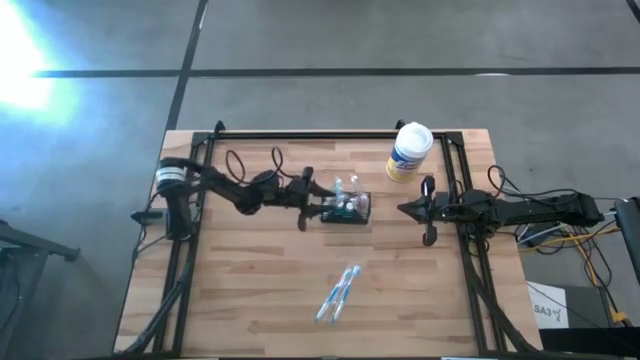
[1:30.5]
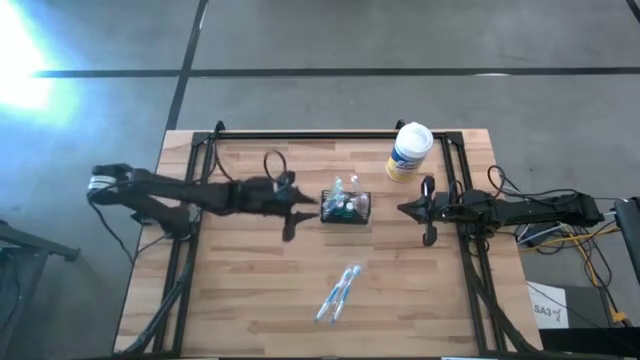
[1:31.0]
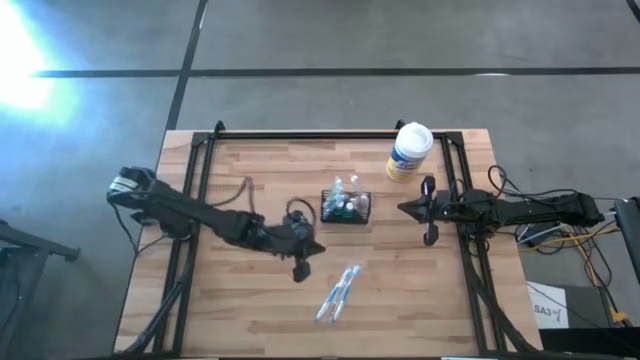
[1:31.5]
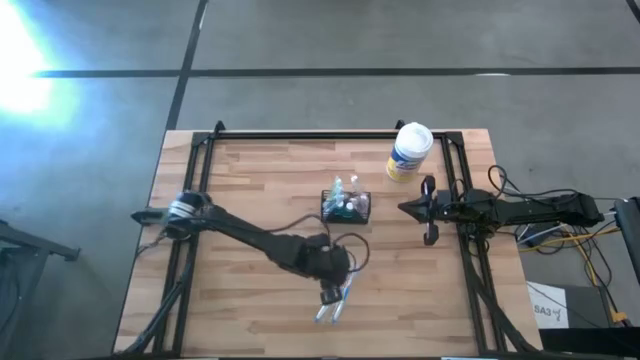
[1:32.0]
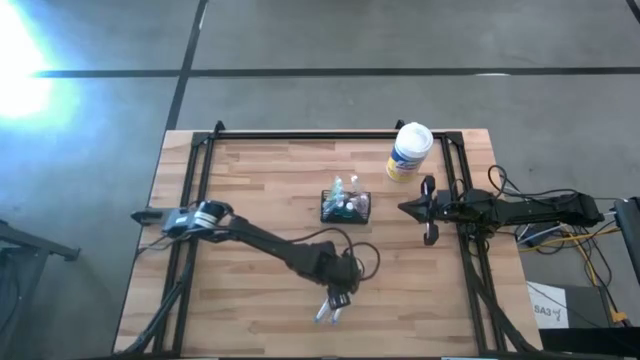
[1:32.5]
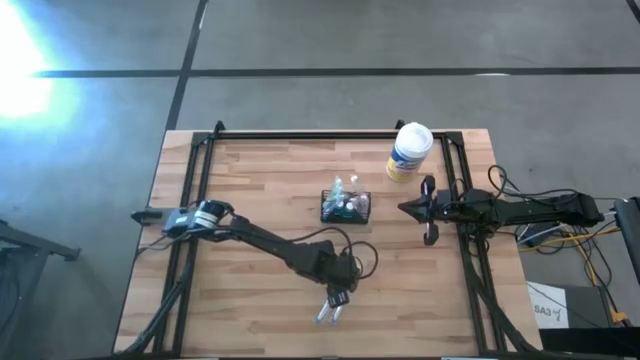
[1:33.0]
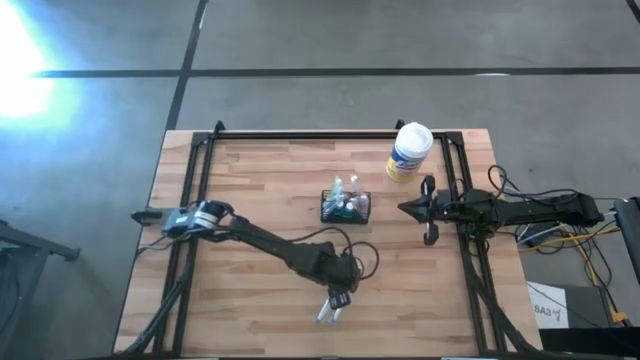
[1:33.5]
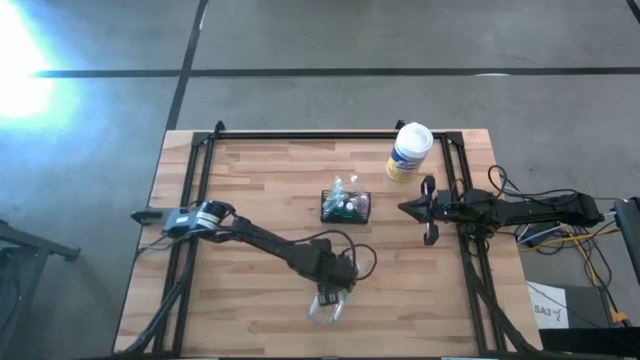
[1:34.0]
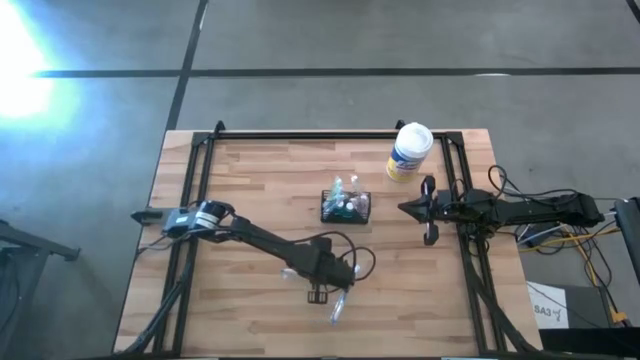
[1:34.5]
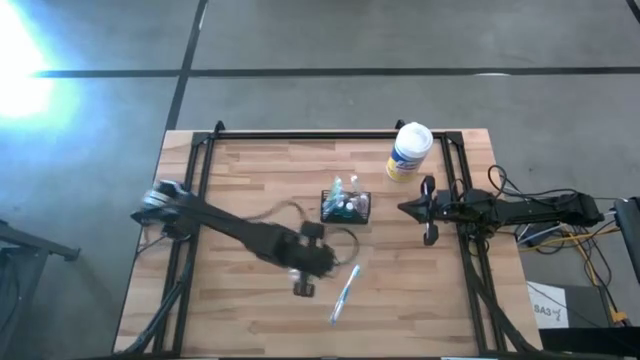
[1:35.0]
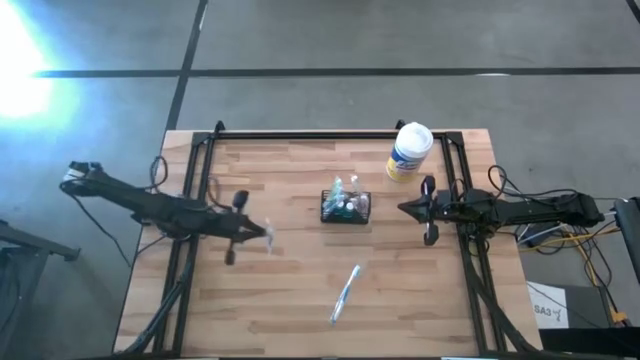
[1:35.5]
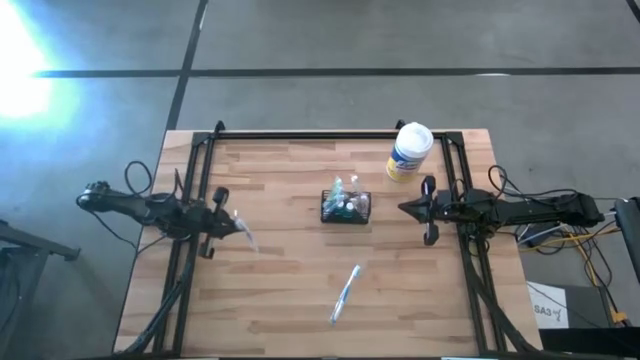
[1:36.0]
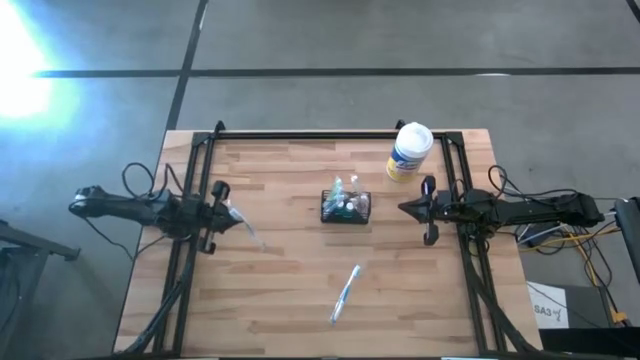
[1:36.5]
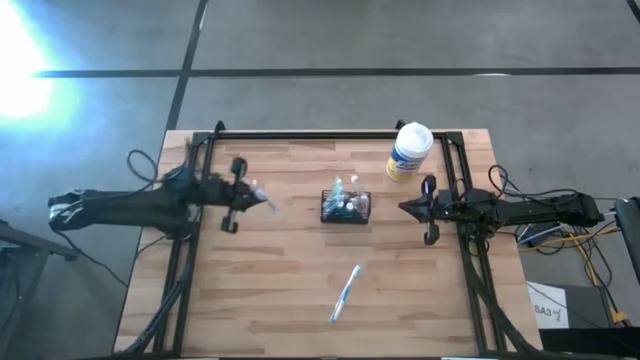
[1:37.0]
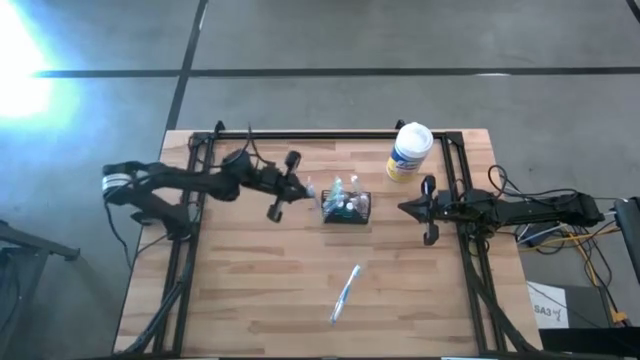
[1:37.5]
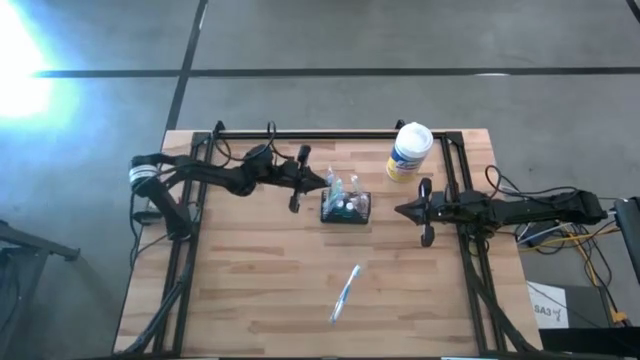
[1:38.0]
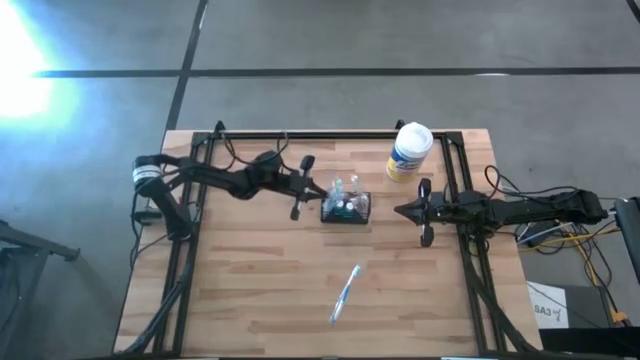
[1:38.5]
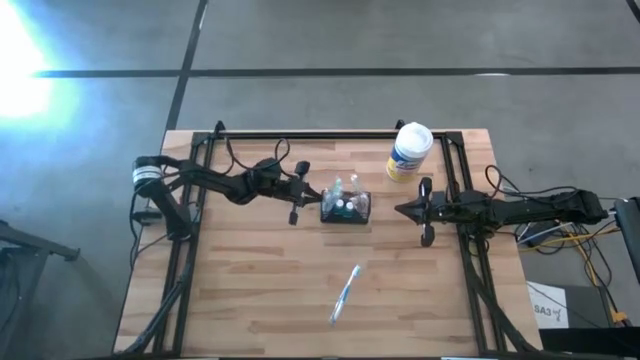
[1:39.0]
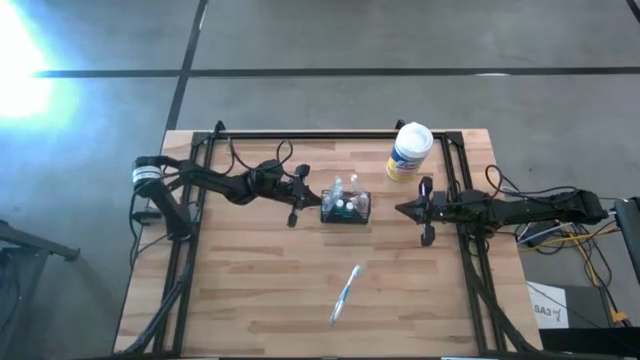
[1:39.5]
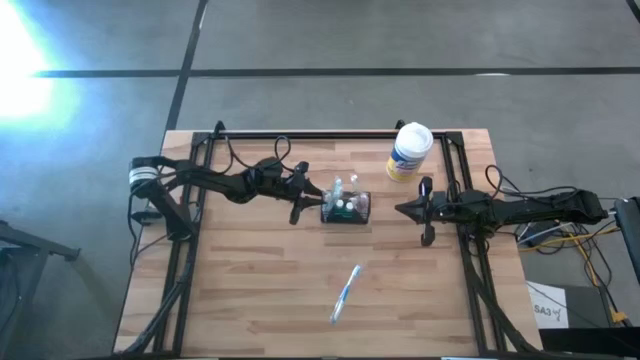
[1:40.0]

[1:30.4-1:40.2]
Task: Pick & Place toothbrushing station
Put the left blue toothbrush into the wire organizer

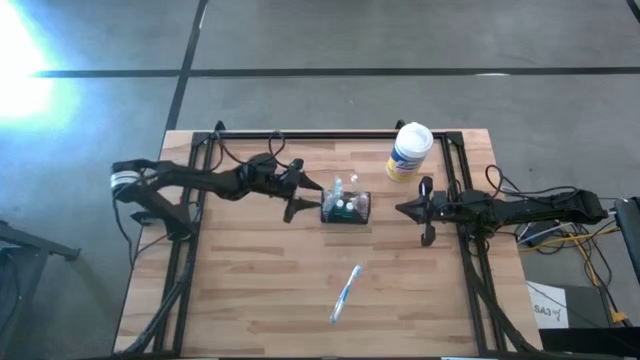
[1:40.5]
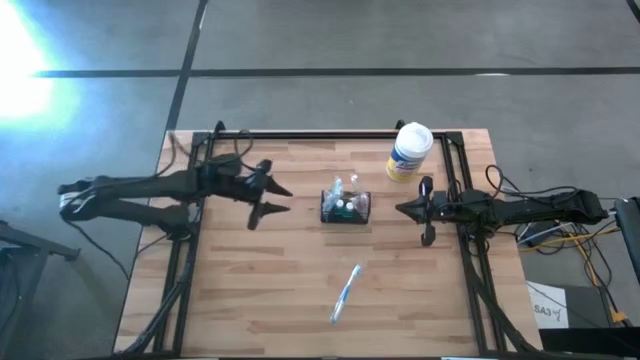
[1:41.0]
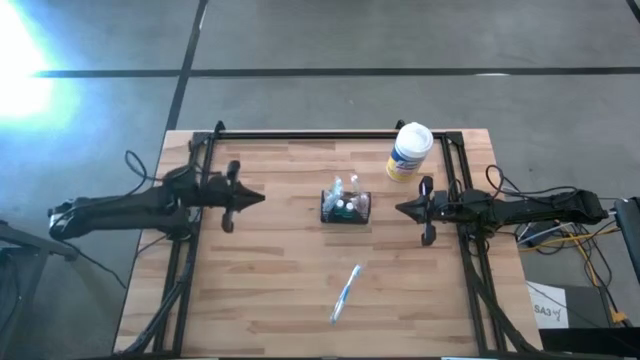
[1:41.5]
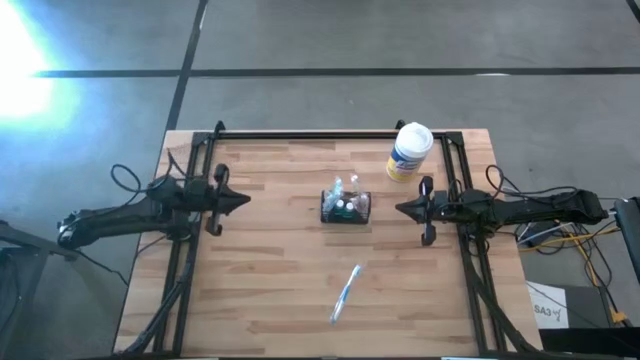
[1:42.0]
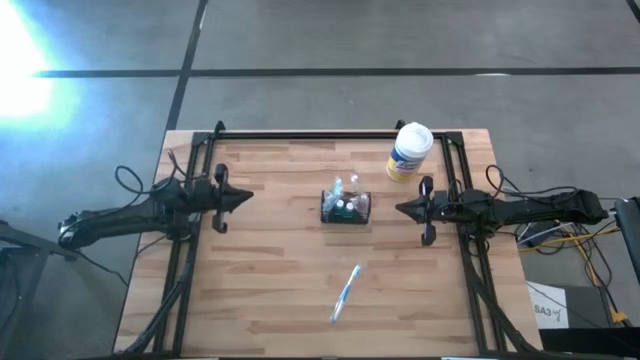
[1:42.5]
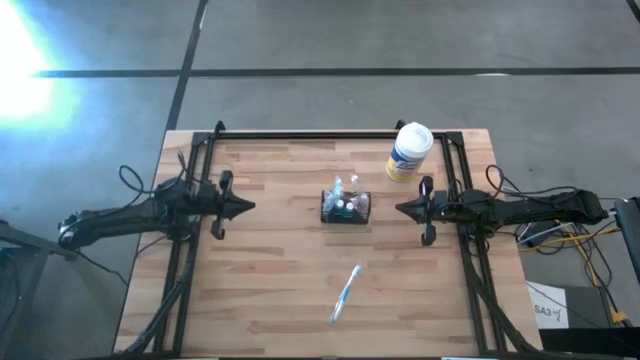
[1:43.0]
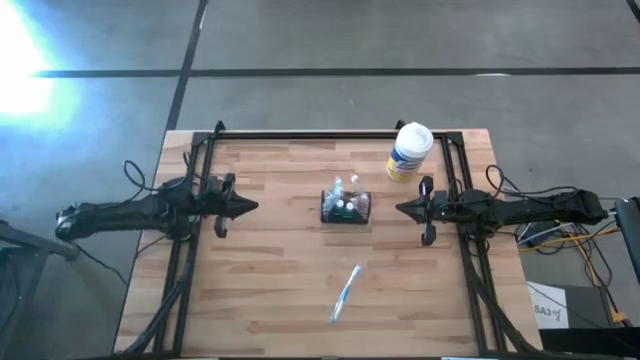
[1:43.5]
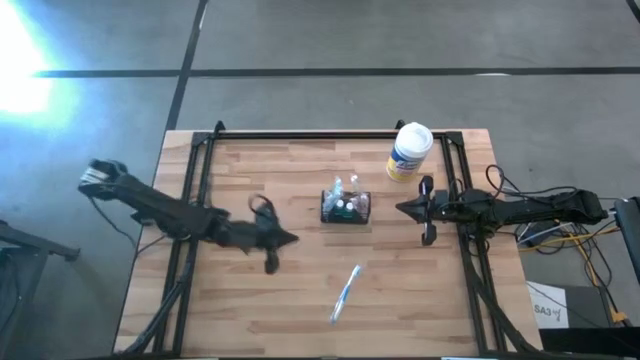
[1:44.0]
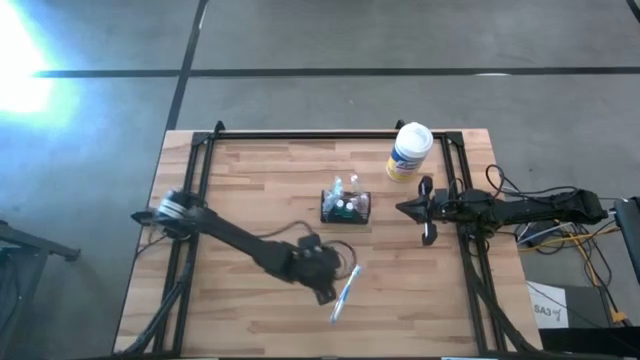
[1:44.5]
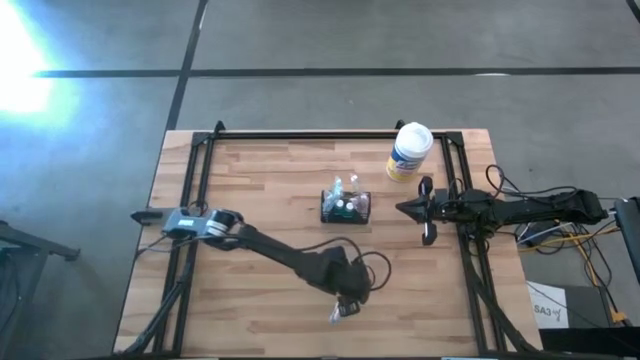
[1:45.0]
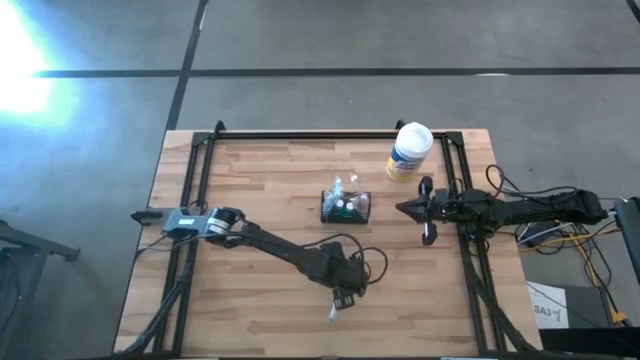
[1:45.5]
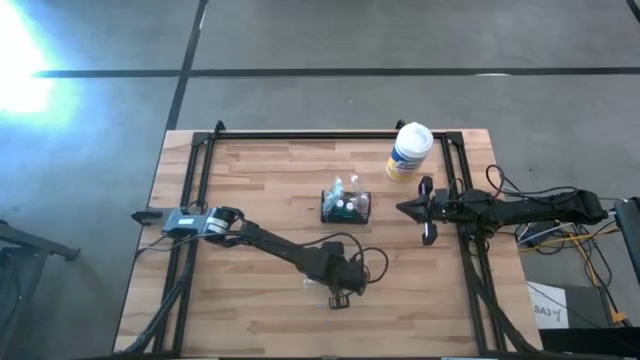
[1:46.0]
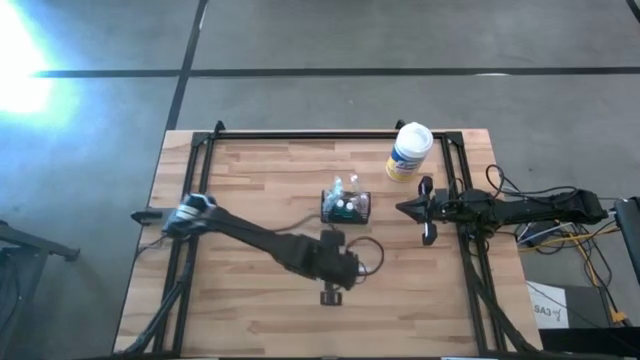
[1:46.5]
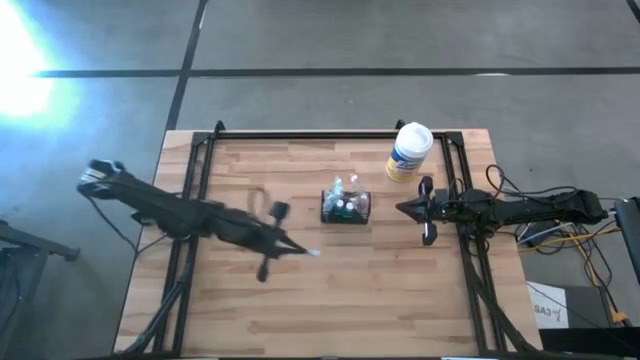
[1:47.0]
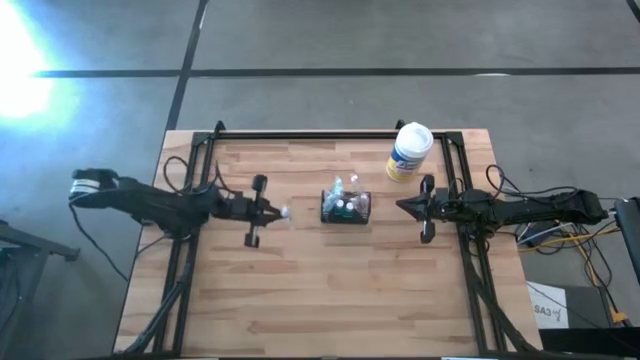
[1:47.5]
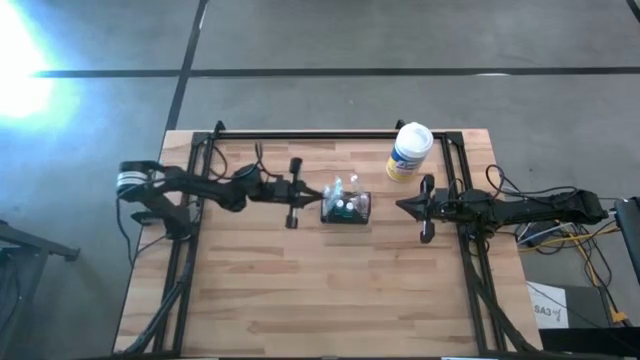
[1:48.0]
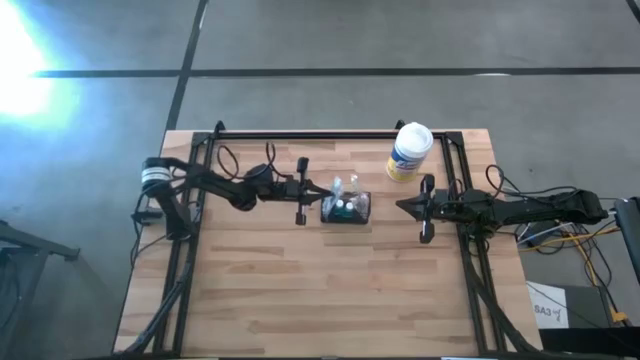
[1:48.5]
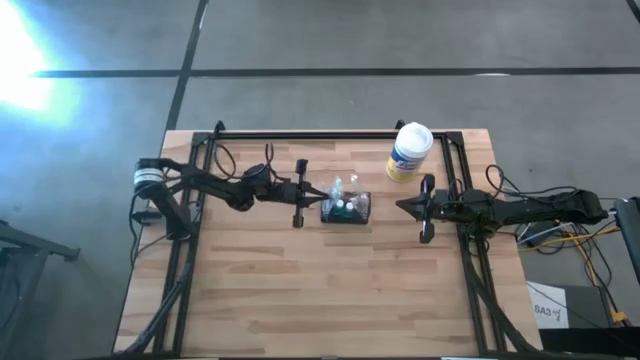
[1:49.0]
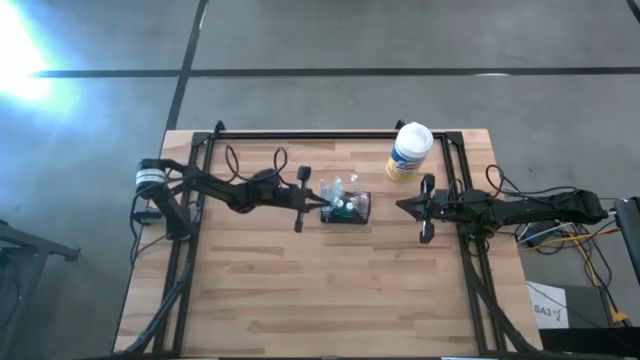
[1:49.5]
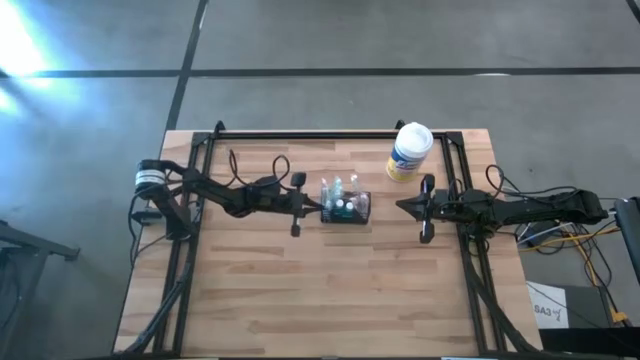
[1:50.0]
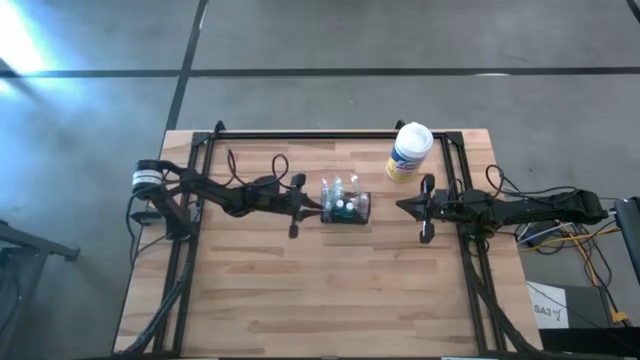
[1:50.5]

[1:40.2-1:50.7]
Put the blue toothbrush into the wire organizer
